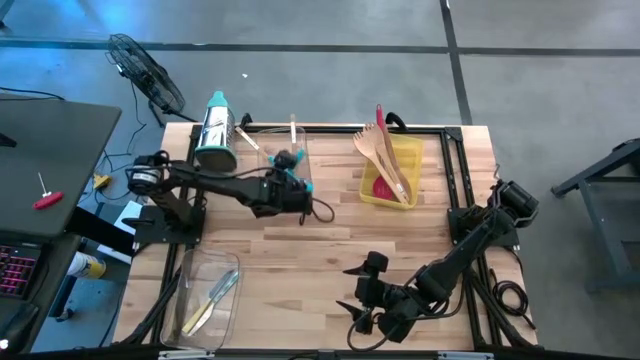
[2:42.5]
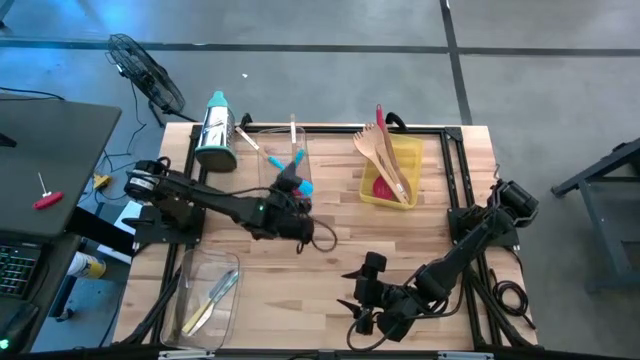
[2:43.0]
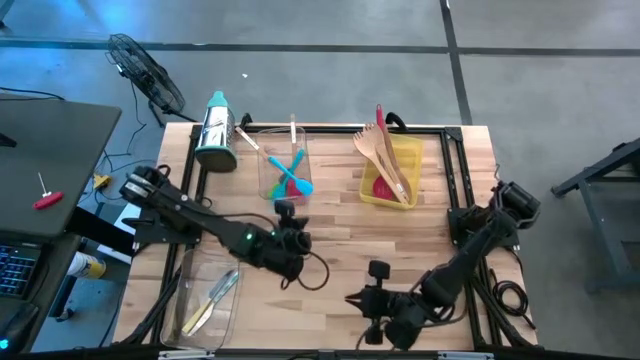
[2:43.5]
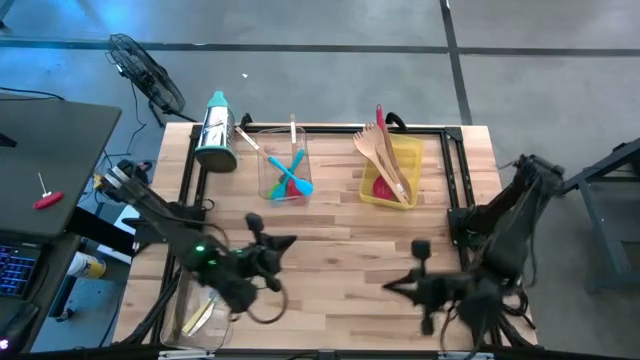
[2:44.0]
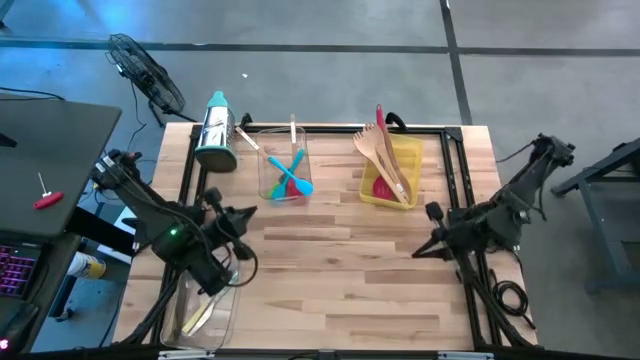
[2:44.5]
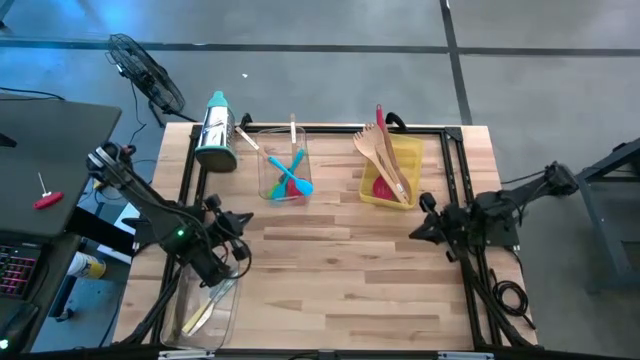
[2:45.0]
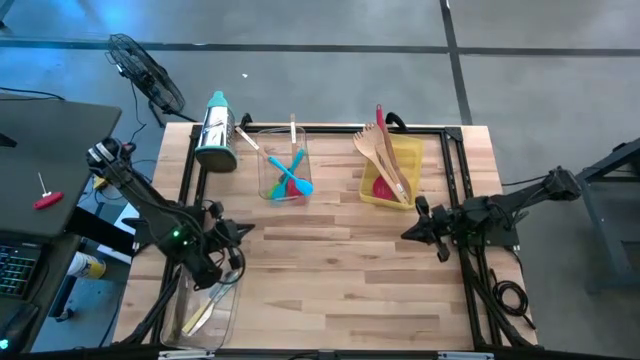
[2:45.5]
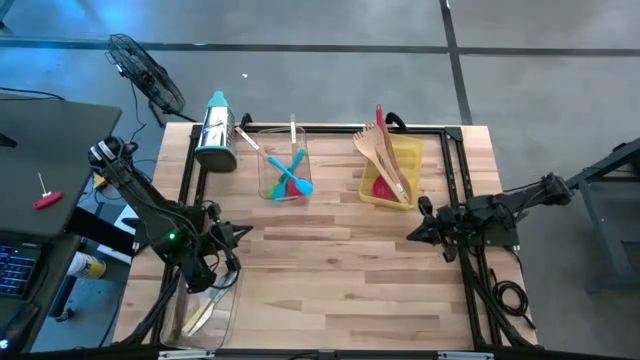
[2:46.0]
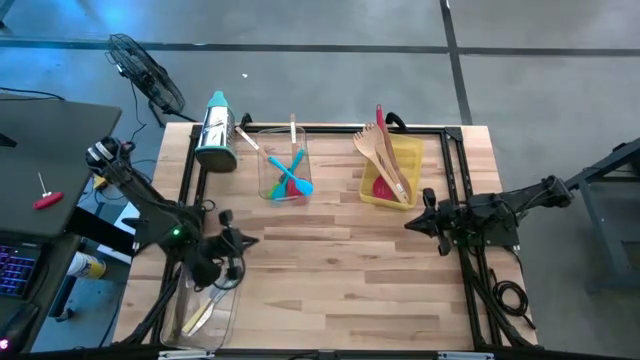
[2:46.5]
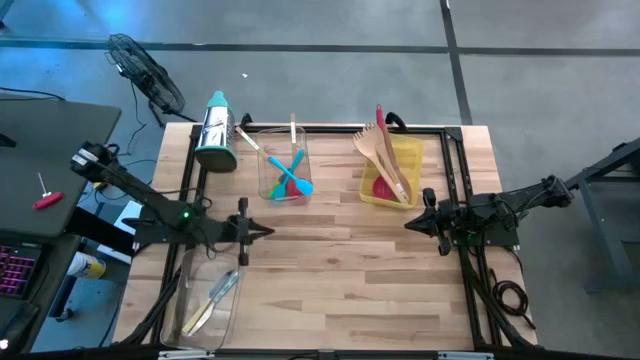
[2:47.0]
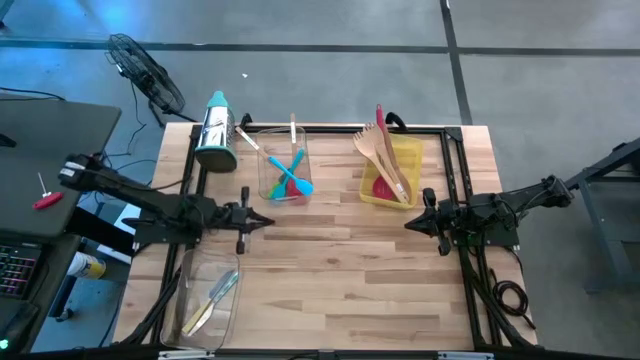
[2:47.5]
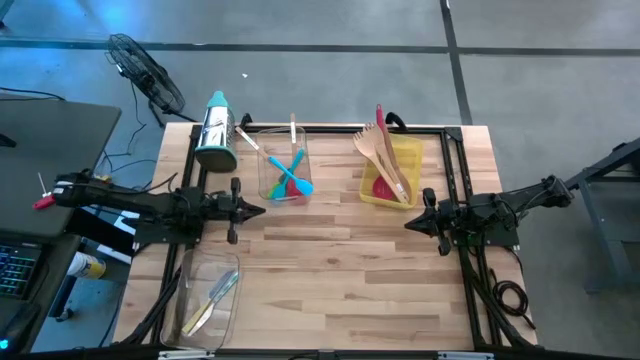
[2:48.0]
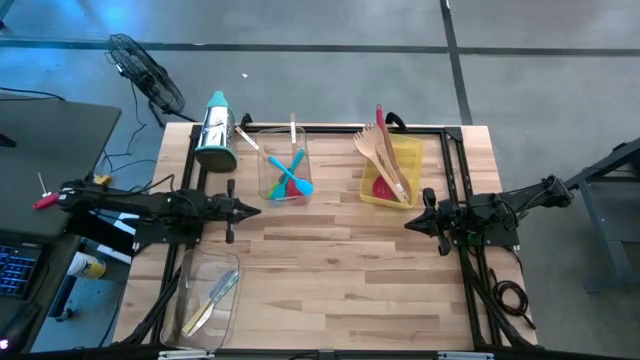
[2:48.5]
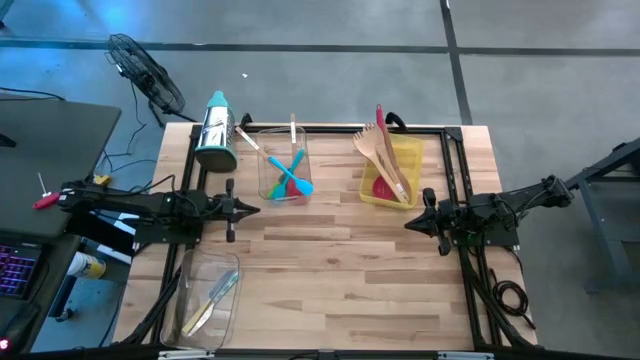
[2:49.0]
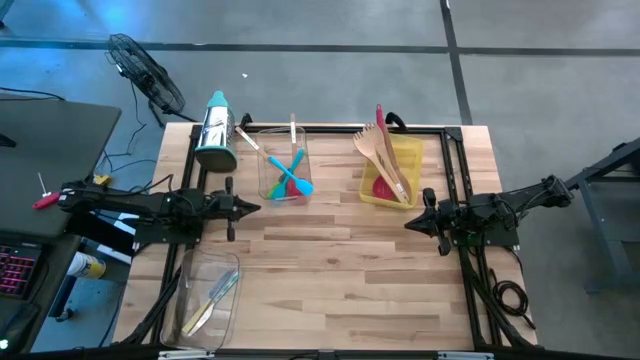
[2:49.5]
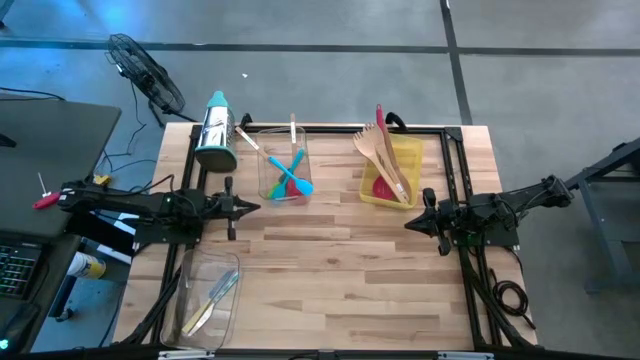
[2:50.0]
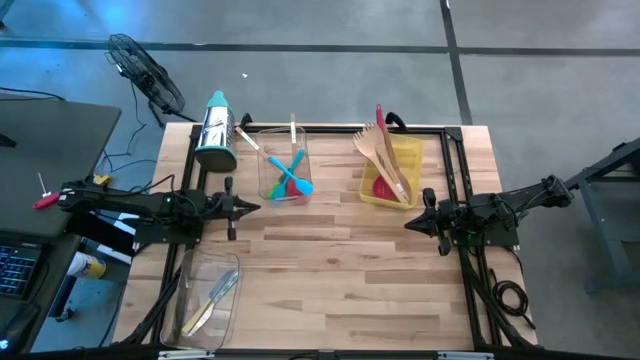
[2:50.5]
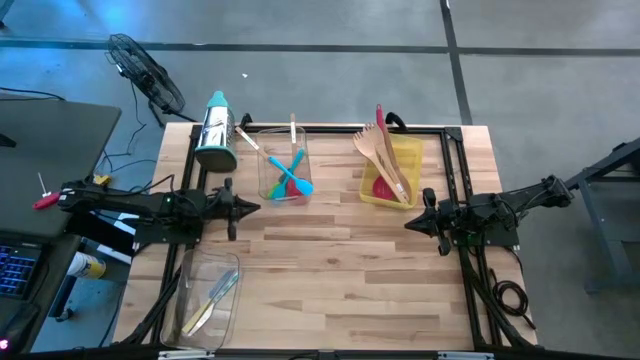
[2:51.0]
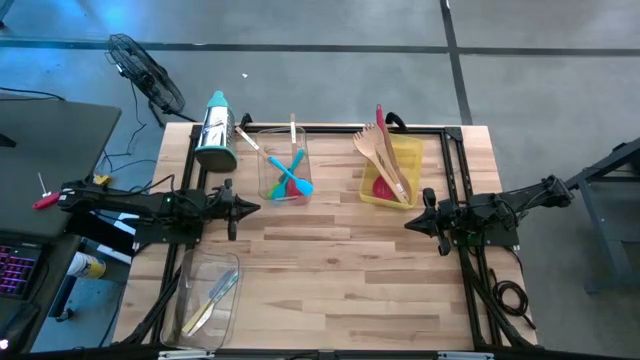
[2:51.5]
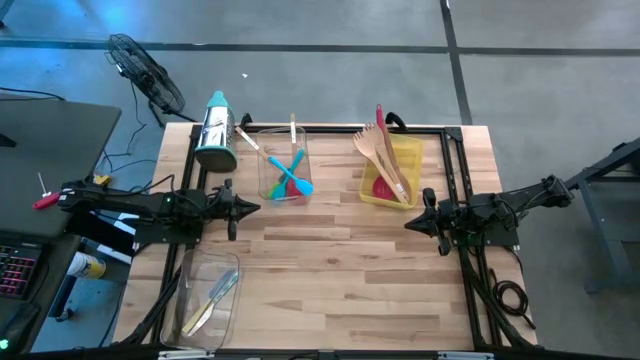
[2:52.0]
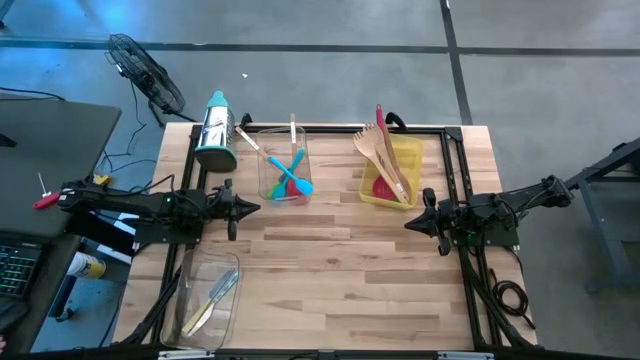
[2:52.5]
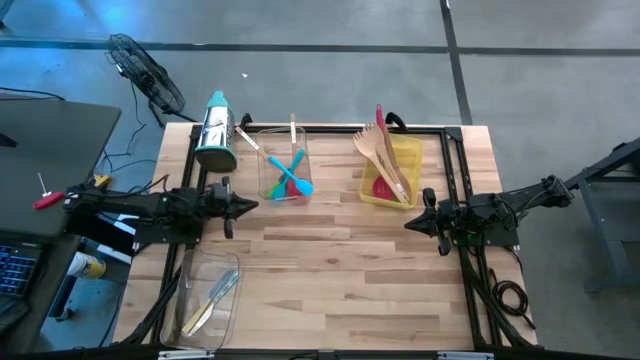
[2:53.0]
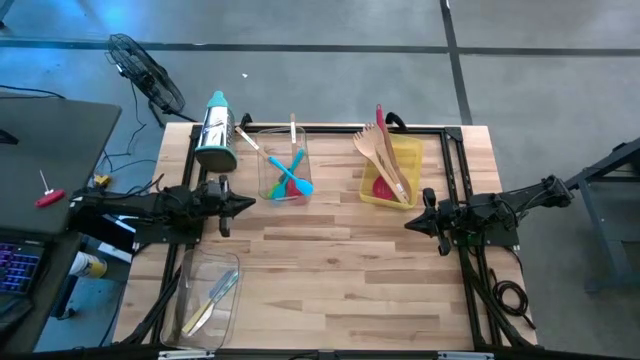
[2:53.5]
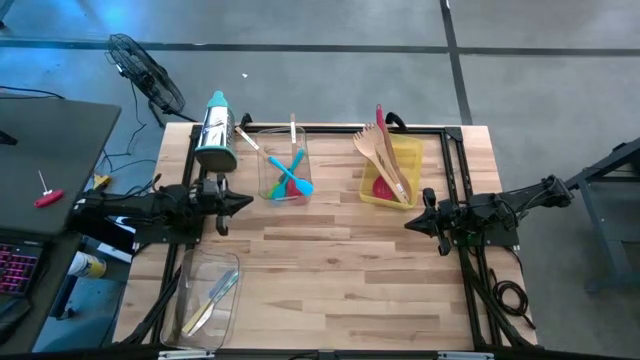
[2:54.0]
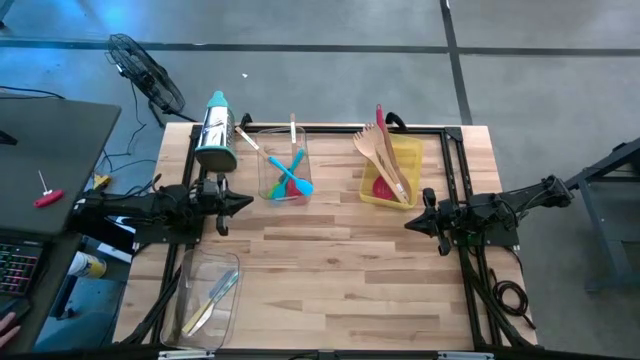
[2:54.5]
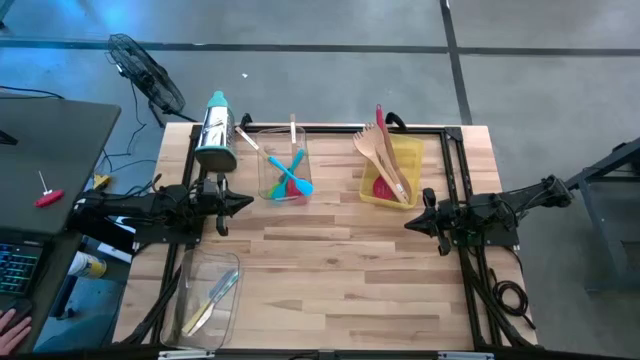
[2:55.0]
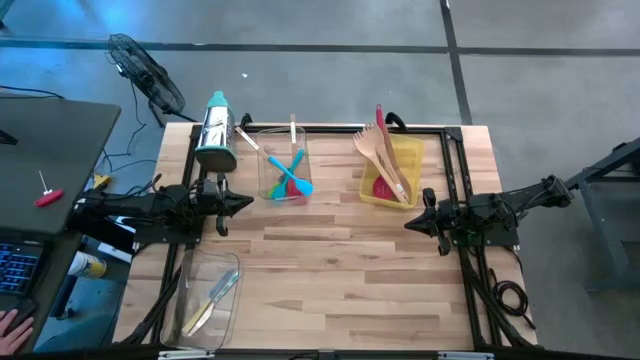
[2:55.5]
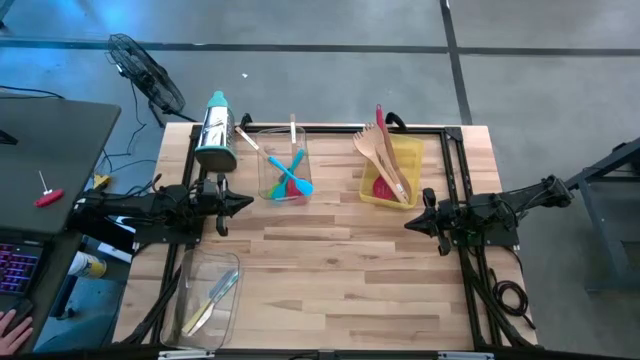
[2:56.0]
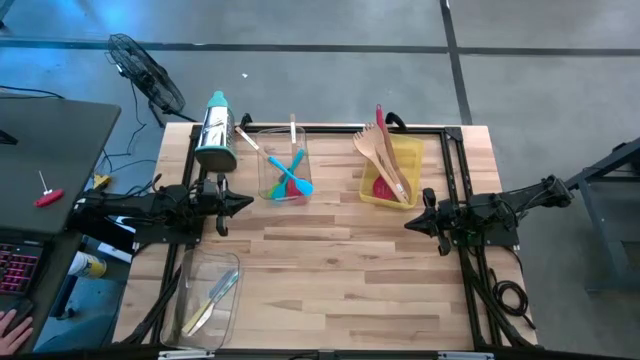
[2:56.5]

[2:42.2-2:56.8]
Task: Pick & Place Kitchen Items
Return to Home Position
